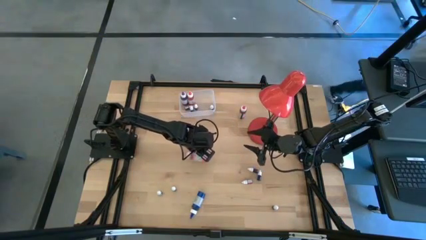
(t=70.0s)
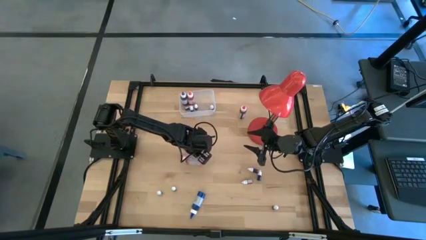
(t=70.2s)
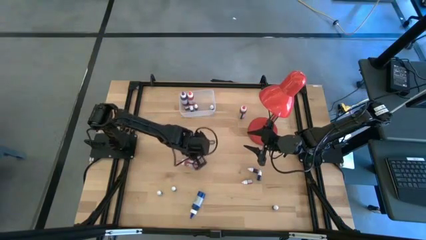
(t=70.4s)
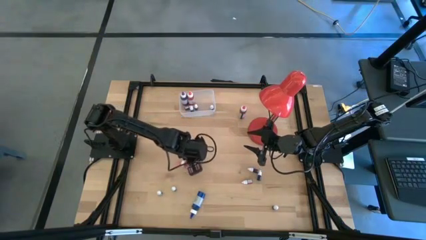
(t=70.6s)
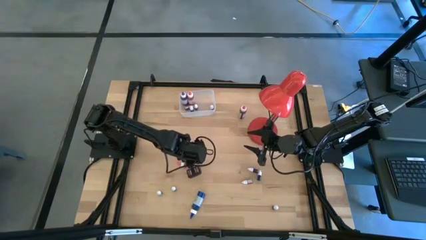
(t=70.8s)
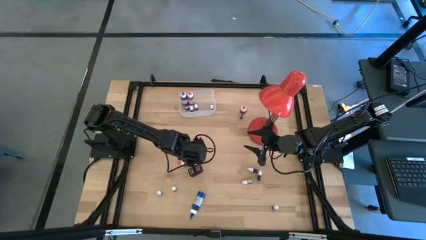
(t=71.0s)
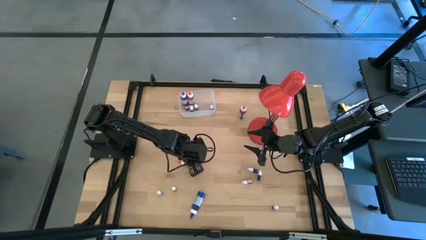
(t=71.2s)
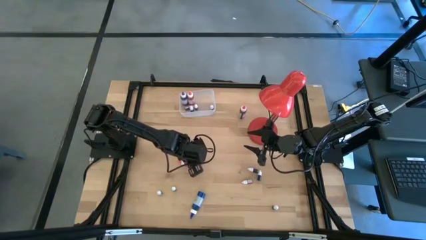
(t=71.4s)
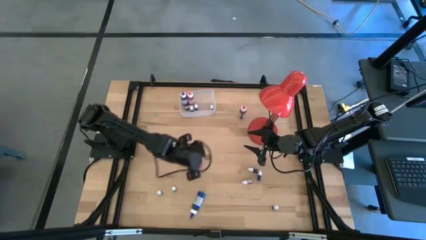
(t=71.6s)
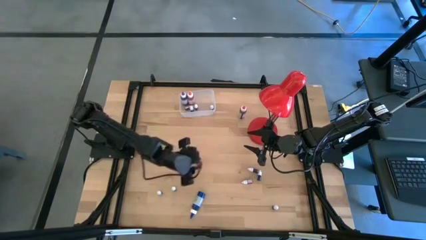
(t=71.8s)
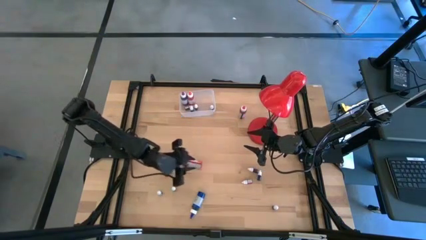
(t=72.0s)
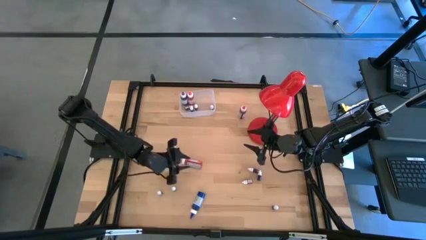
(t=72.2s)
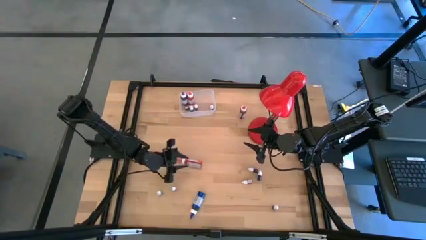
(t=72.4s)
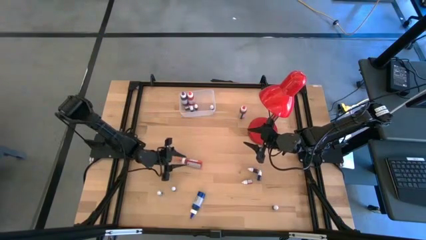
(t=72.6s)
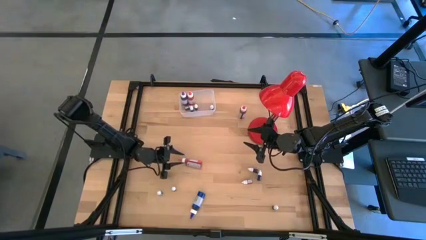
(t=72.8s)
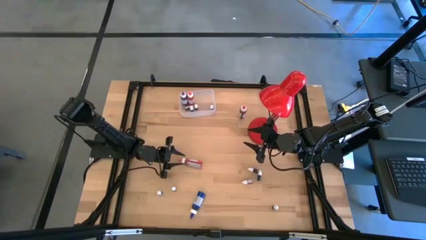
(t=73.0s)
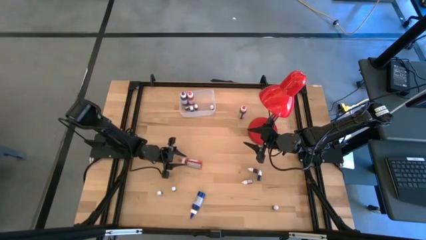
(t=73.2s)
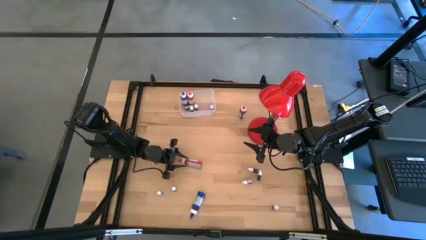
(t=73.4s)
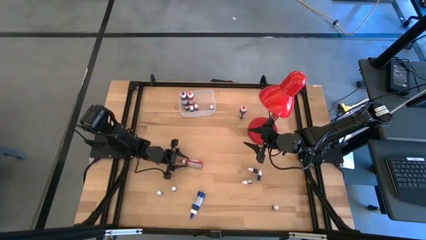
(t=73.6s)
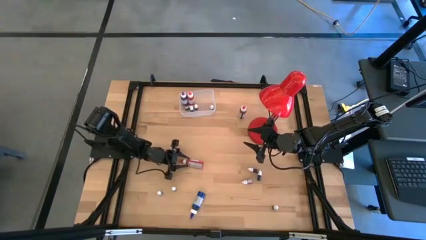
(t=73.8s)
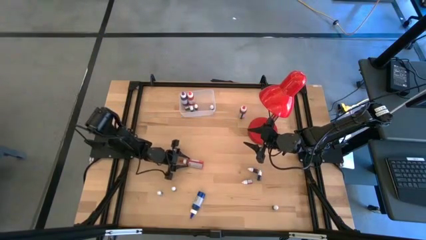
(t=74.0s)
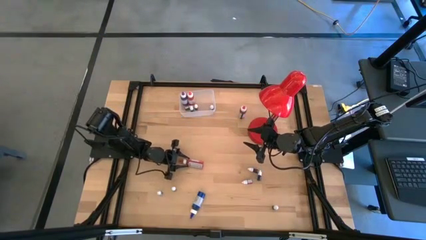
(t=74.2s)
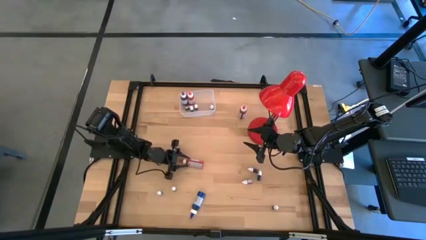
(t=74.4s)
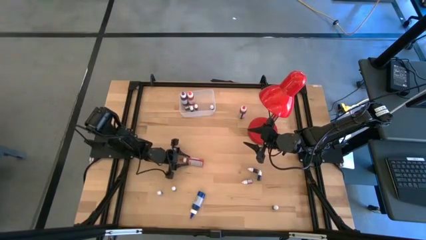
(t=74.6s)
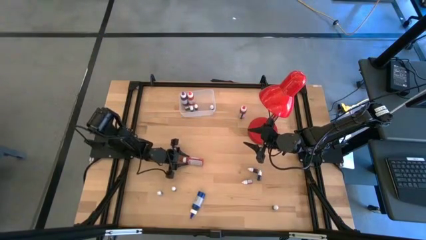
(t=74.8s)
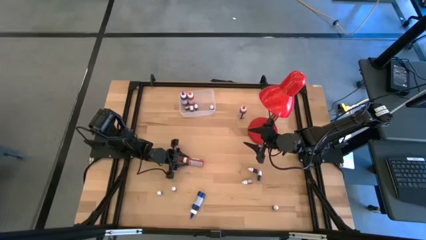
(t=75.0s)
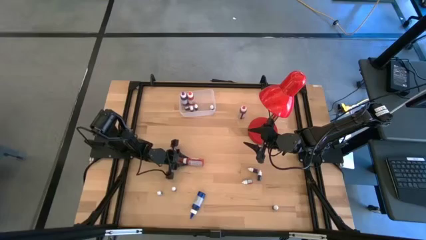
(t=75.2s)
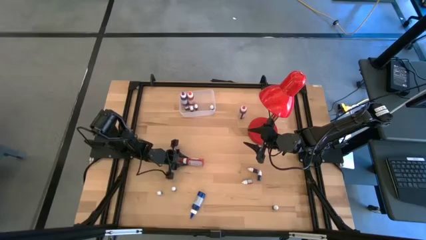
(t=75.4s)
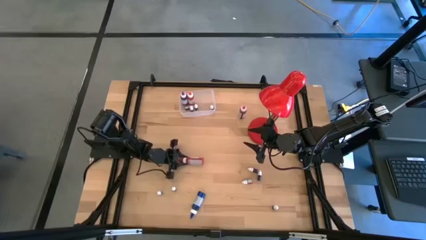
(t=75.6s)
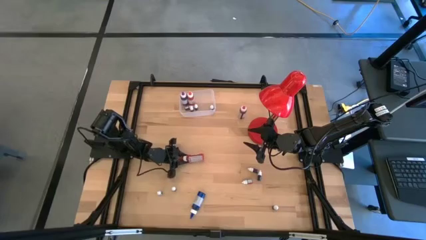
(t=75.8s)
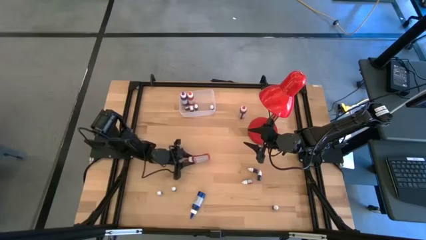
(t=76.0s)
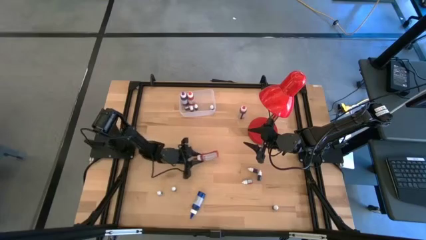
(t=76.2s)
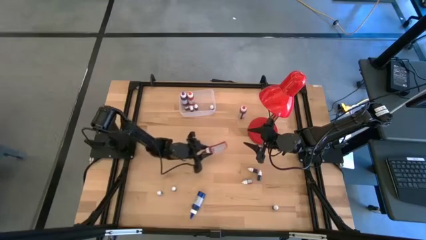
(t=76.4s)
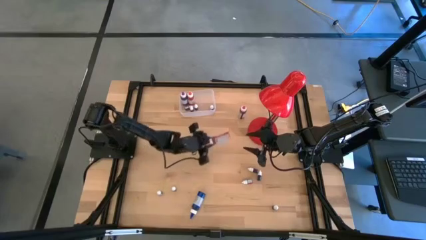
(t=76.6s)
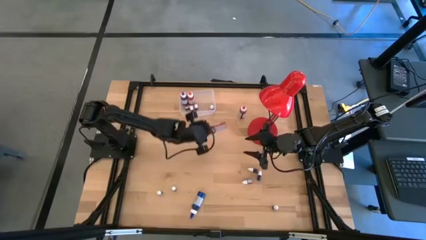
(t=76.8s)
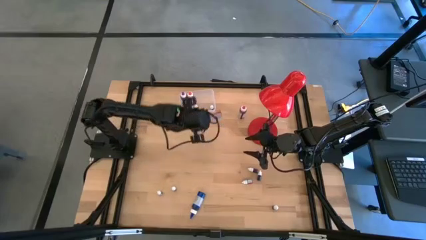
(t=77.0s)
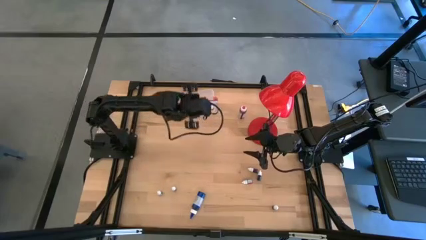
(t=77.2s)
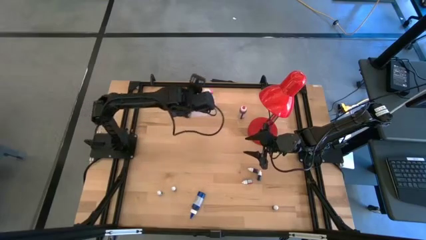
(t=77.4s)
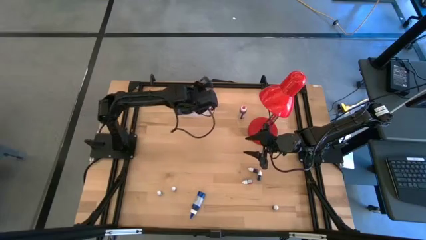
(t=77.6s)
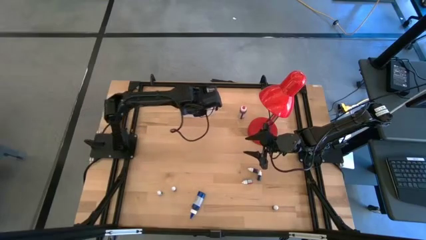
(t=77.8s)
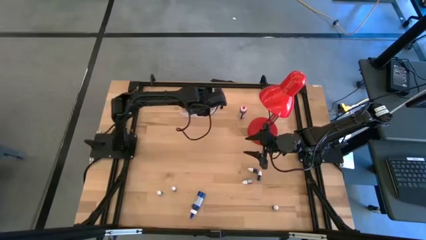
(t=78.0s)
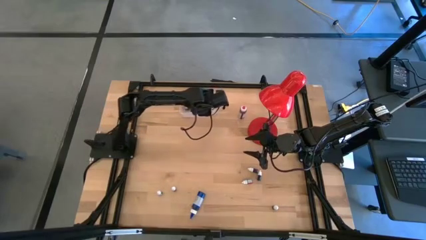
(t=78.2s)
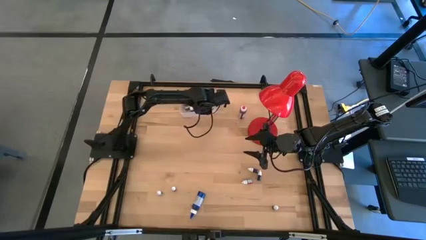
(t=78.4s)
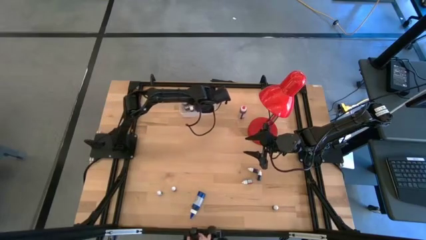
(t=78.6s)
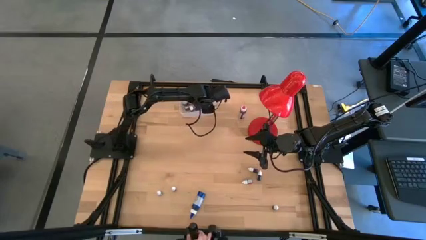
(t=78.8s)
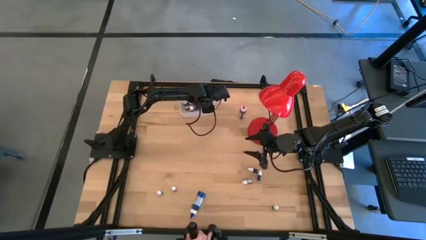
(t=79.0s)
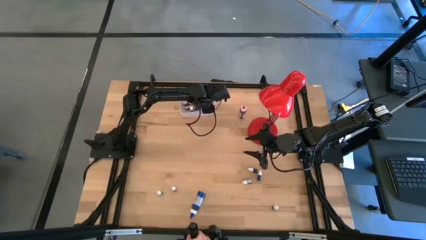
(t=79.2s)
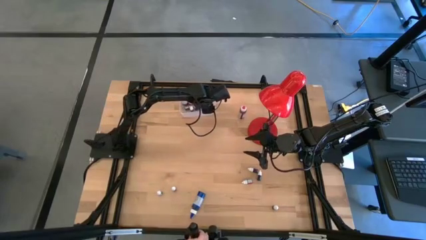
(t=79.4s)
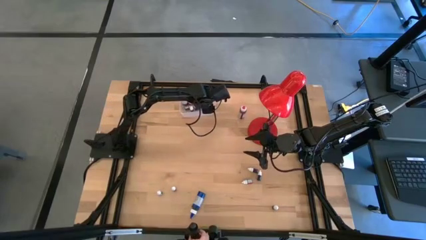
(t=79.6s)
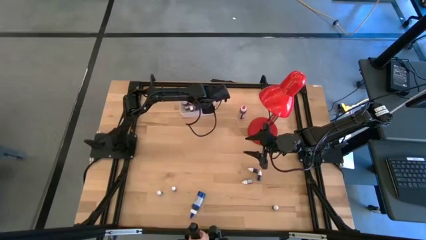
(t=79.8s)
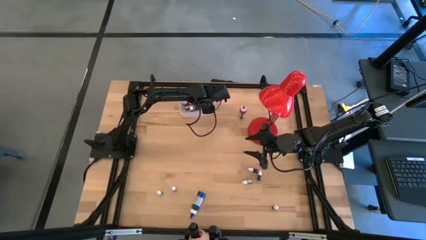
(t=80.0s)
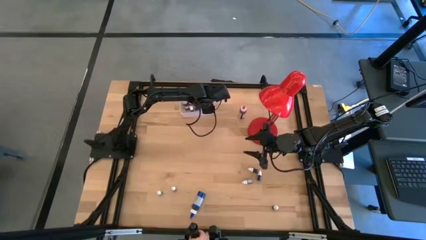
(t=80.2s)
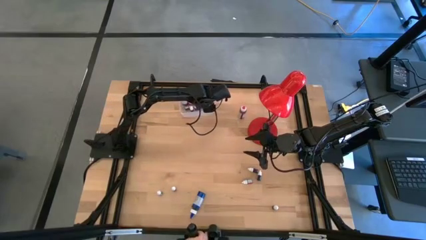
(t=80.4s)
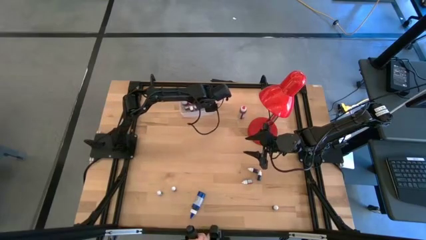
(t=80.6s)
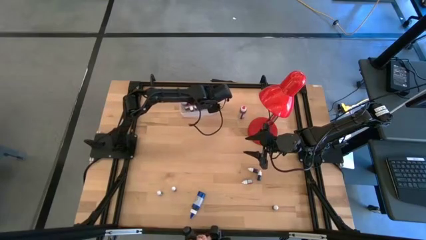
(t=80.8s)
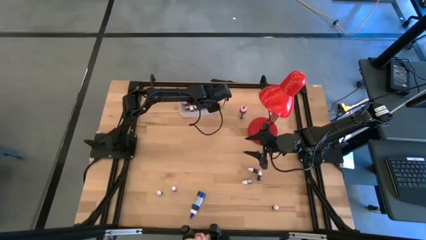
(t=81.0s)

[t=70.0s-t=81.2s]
Task: Pick & Place food coloring
Put the large orange food coloring bottle into the transparent bin

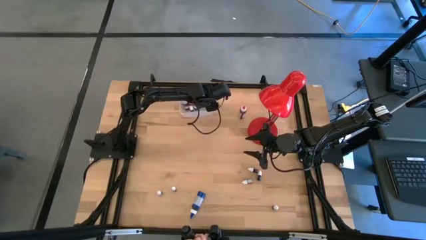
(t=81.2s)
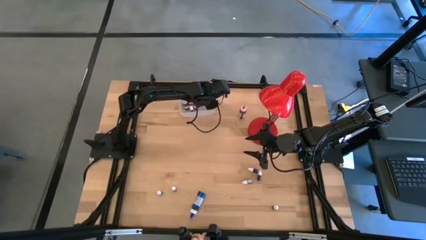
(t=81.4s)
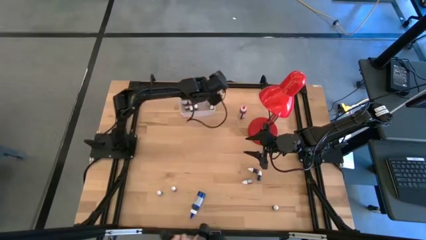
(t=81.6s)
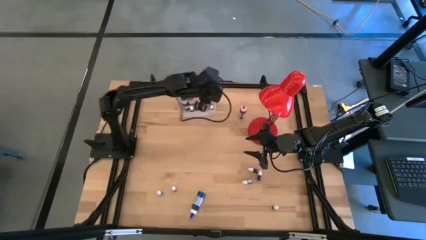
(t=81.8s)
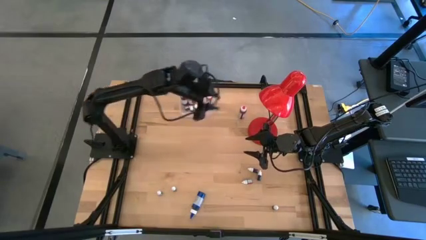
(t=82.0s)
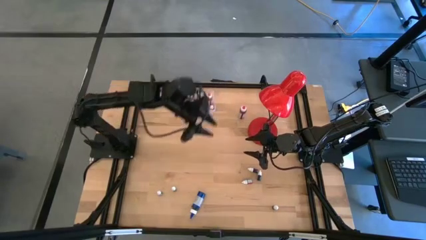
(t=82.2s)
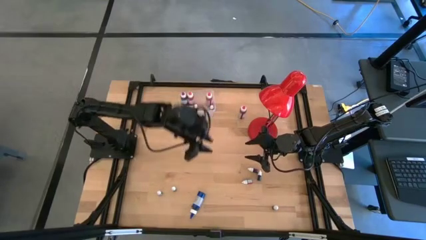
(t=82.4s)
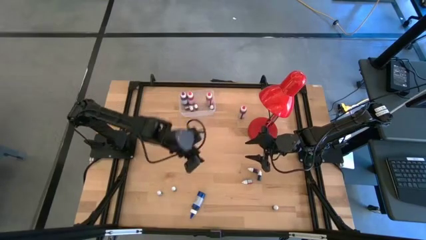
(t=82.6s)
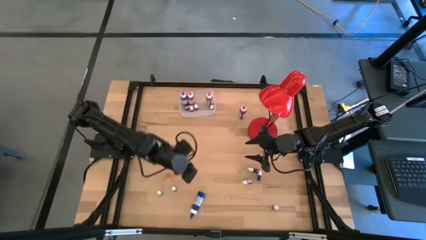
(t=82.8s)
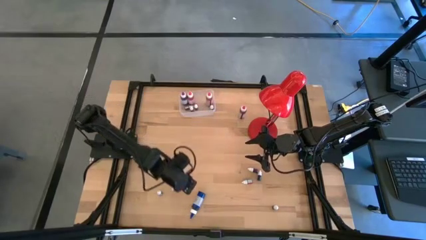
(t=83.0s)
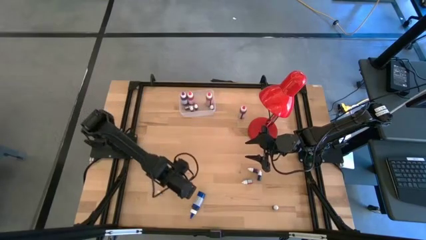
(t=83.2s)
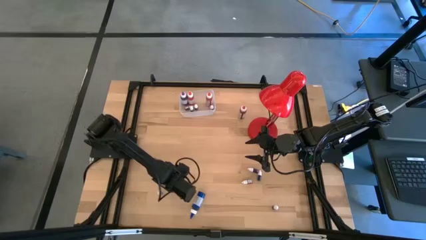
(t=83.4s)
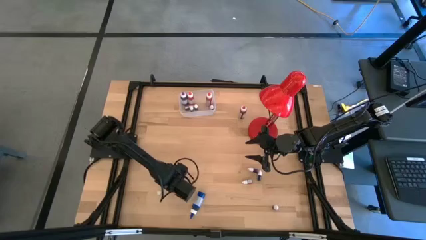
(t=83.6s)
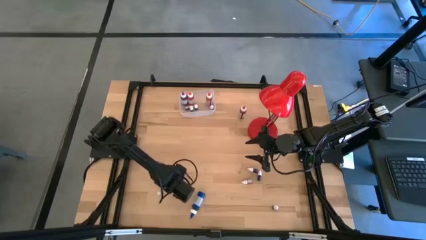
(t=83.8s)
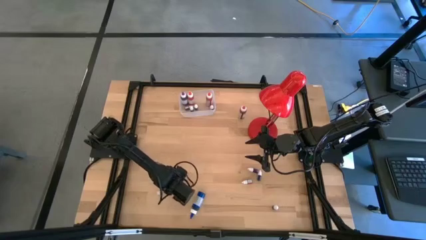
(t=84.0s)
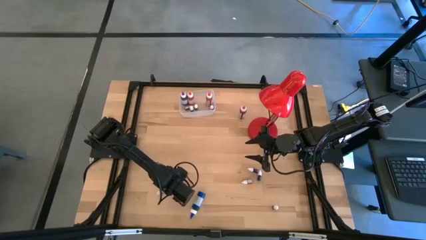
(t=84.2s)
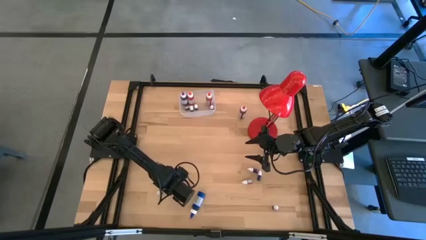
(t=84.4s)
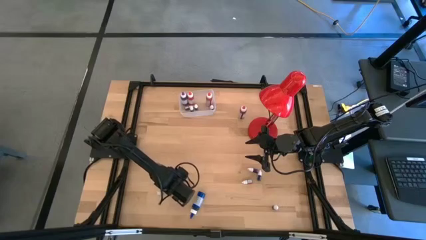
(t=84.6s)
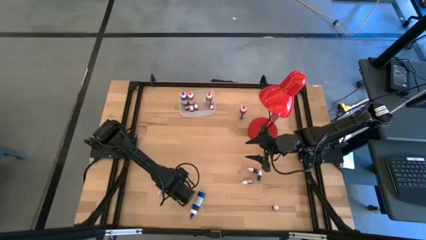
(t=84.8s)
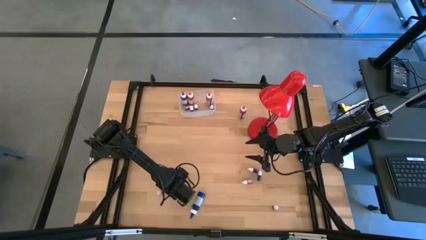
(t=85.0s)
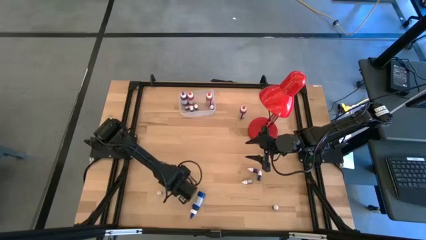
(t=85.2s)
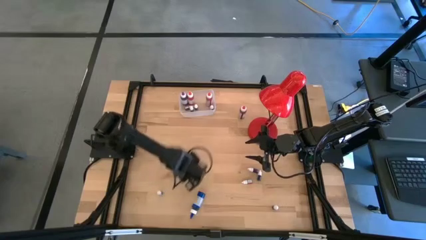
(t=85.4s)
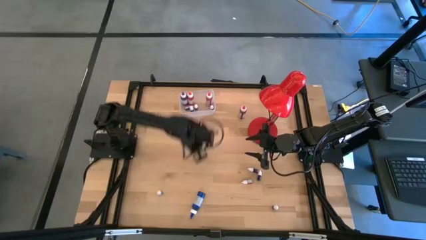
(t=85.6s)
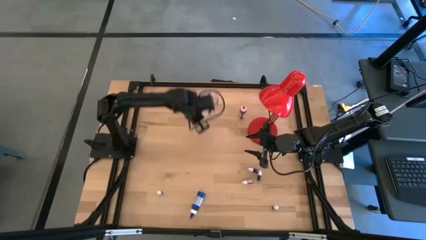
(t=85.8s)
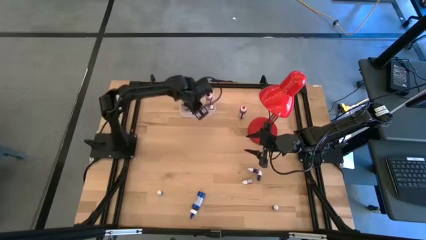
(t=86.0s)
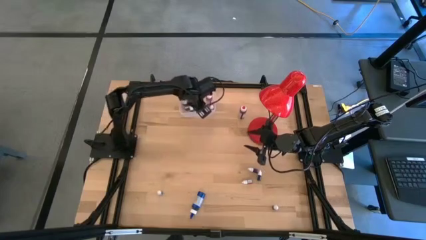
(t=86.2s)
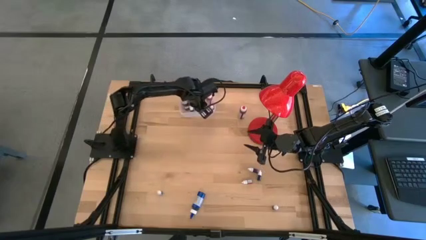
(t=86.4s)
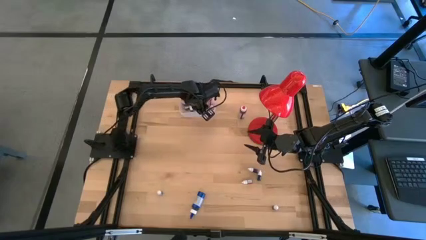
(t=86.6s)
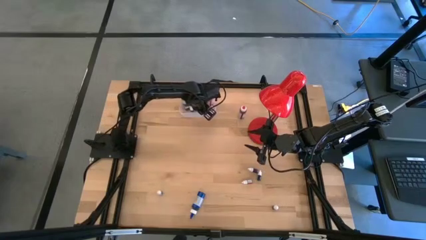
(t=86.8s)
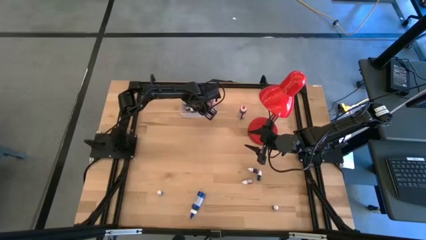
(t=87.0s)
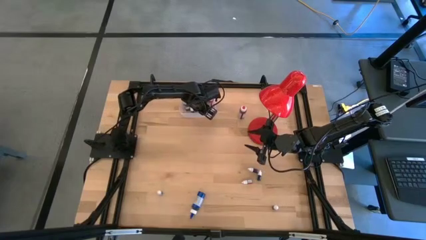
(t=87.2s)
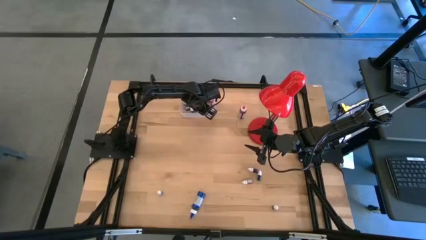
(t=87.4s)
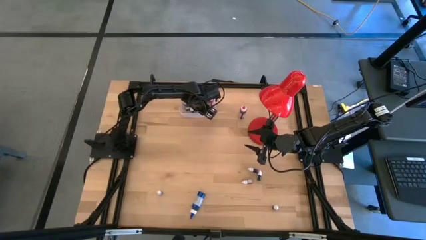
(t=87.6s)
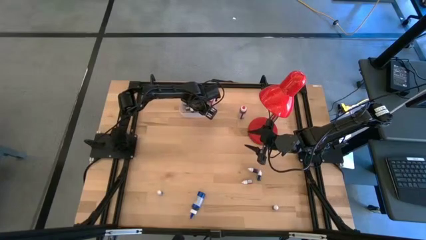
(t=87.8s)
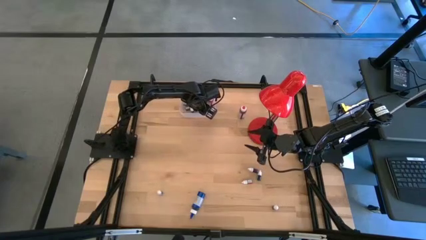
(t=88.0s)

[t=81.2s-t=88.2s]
Put the top small black food coloring bottle into the transparent bin
